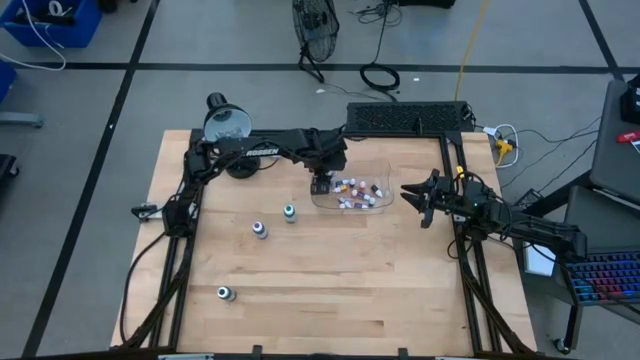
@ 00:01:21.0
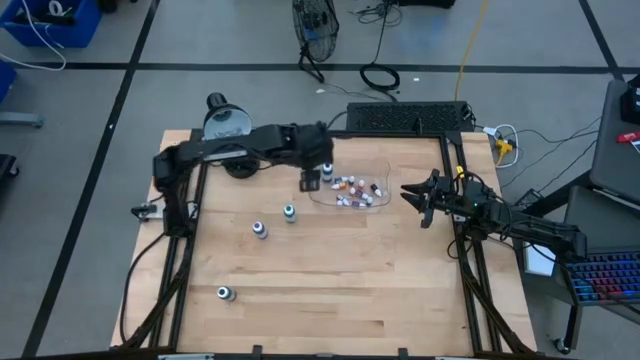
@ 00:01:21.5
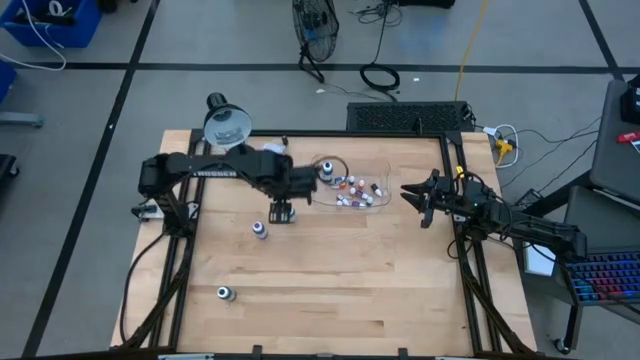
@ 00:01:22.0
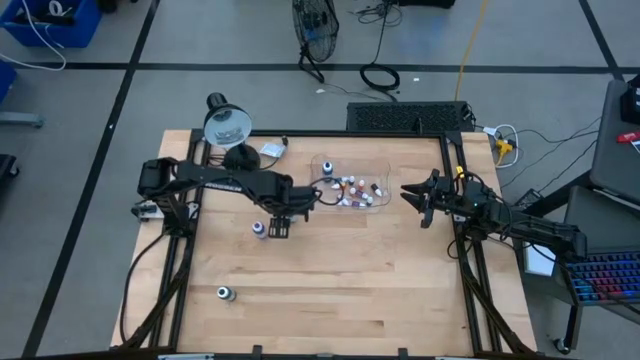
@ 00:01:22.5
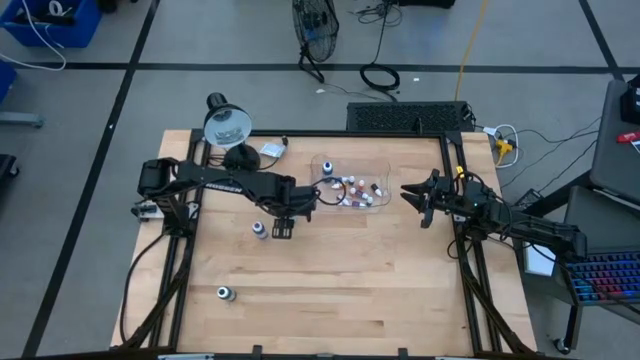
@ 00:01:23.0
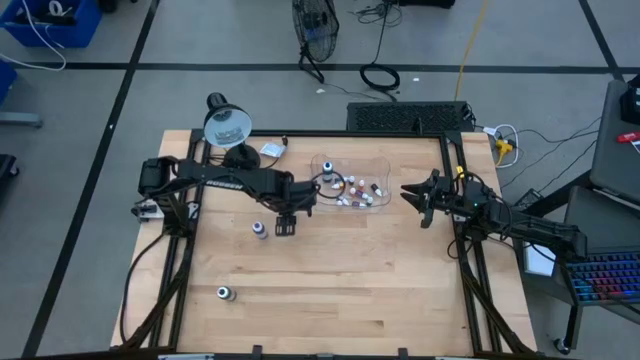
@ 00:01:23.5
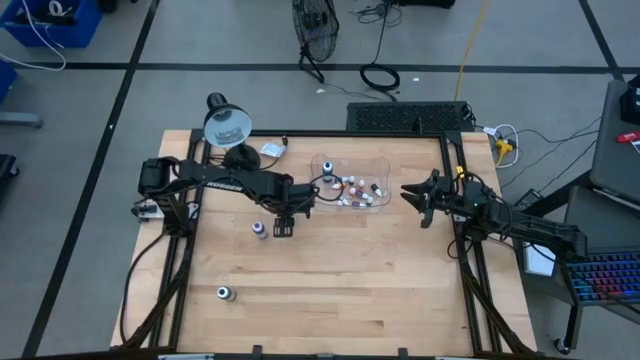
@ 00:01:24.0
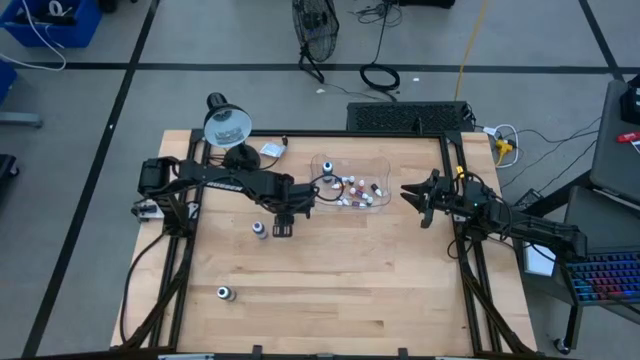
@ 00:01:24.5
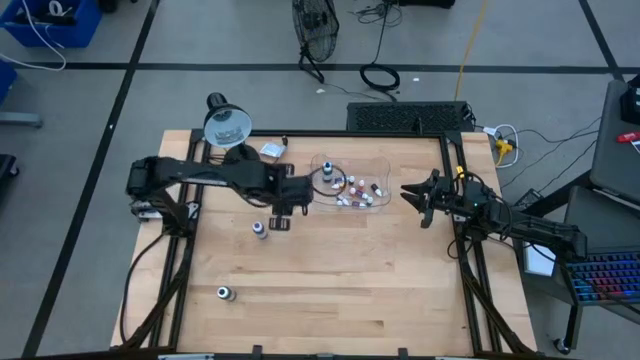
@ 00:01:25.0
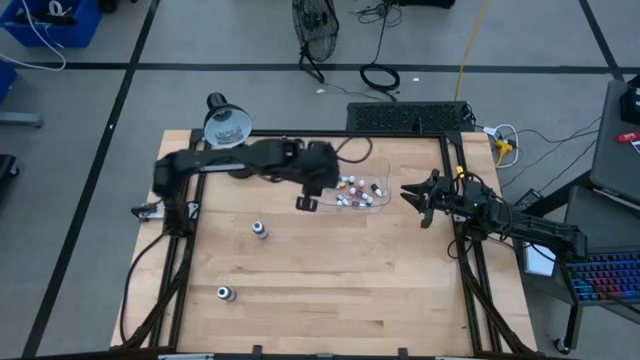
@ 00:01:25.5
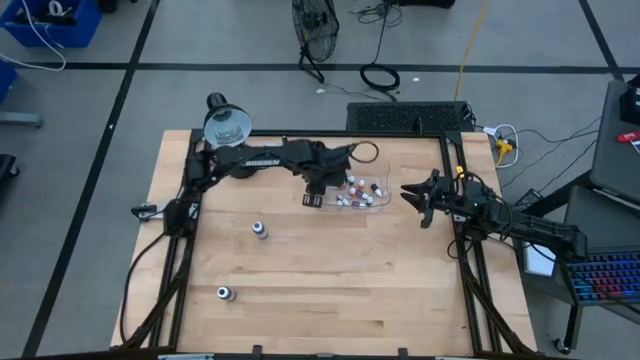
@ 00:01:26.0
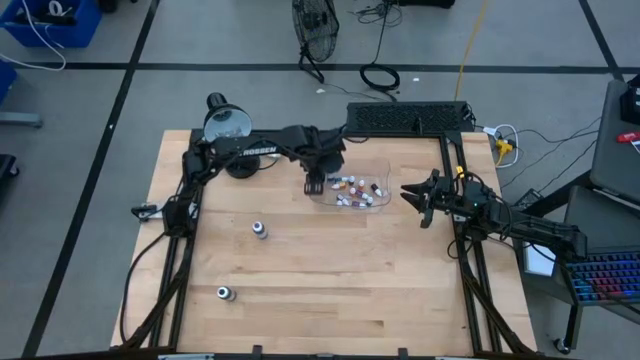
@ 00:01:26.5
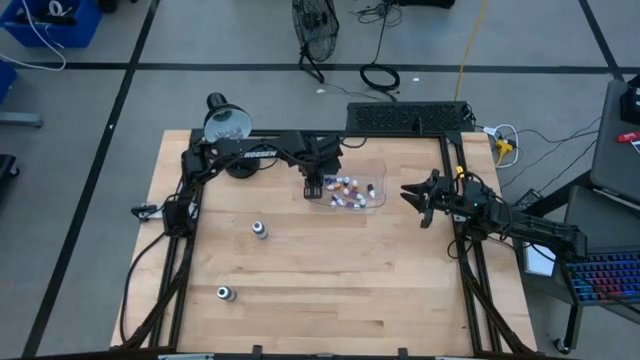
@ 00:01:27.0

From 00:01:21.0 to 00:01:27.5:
Task: Pick & Place food coloring
Put the green big food coloring into the transparent bin

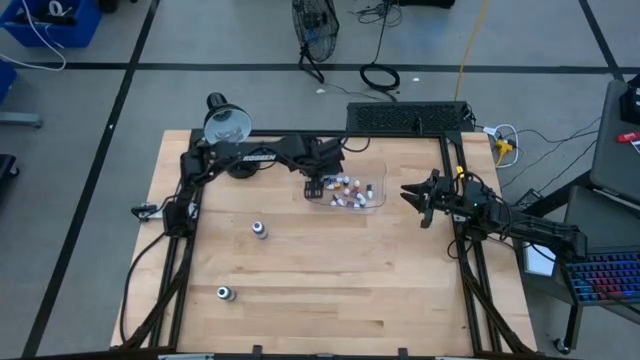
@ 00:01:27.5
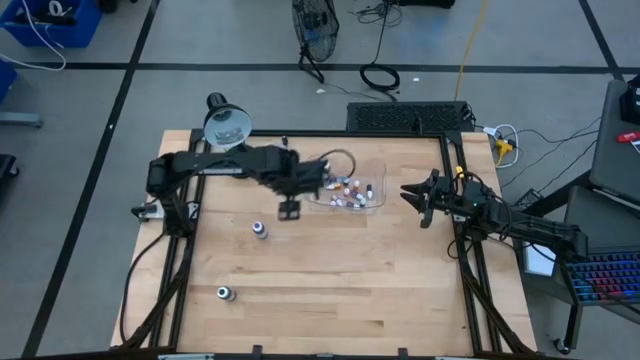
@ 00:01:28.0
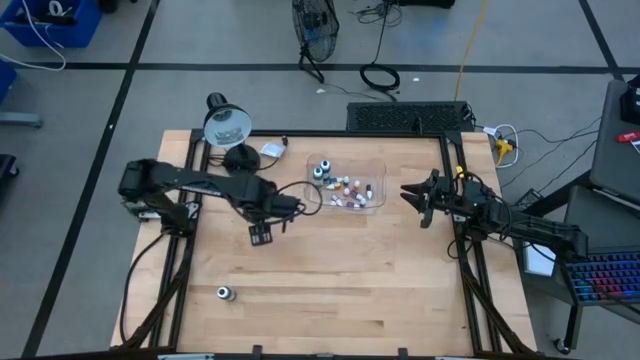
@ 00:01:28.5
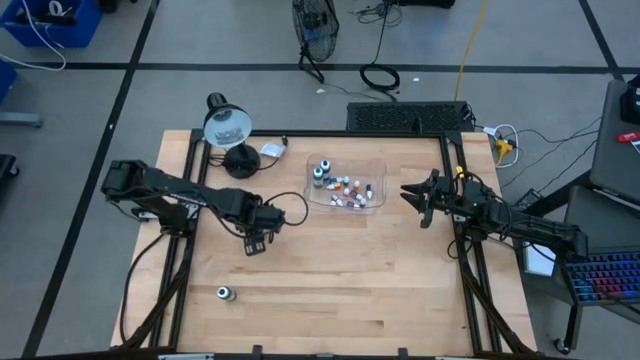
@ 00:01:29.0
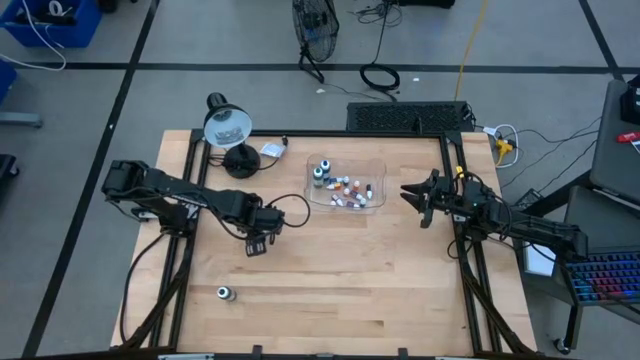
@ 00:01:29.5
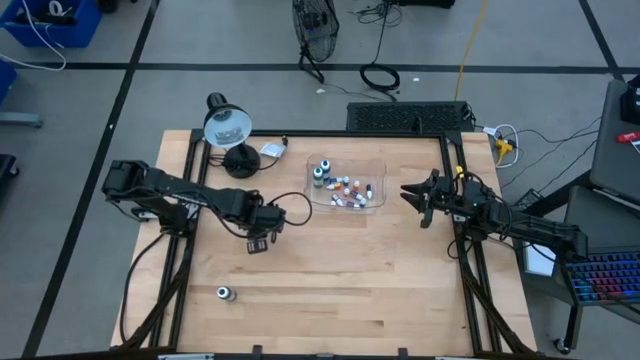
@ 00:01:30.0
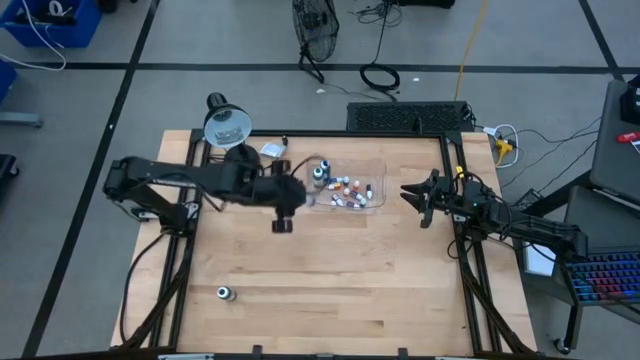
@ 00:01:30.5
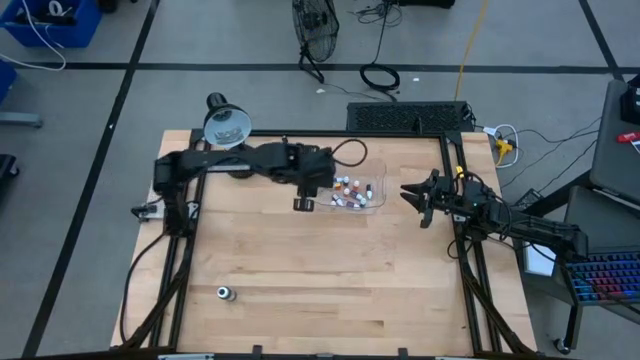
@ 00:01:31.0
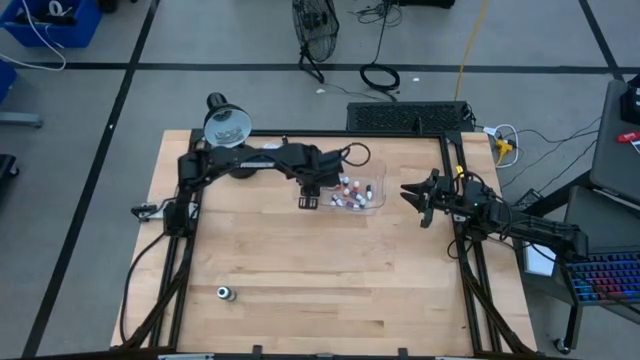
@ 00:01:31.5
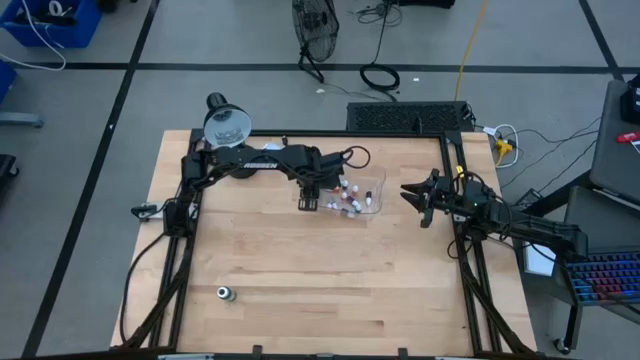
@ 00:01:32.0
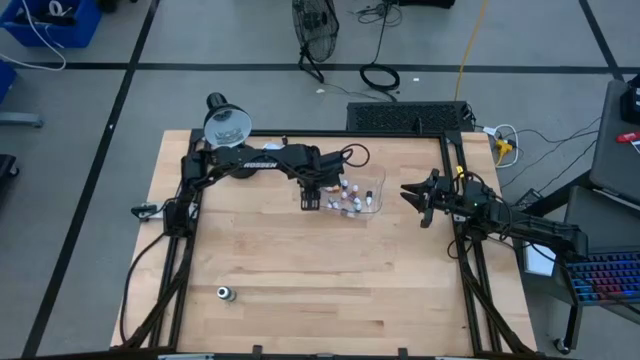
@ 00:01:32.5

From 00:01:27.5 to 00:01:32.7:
Put the purple big food coloring into the transparent bin

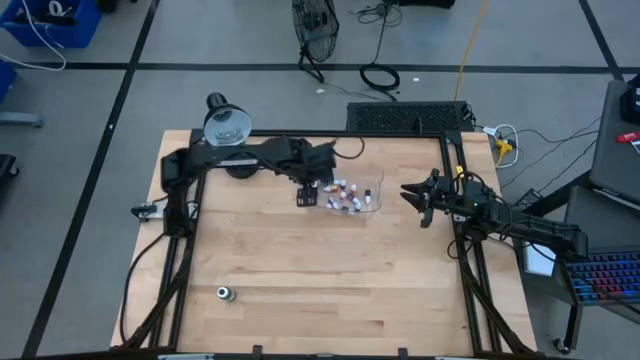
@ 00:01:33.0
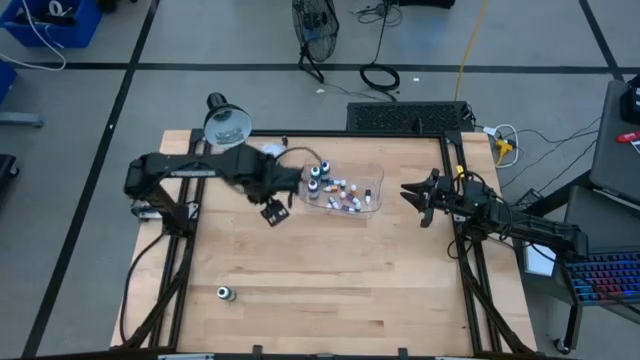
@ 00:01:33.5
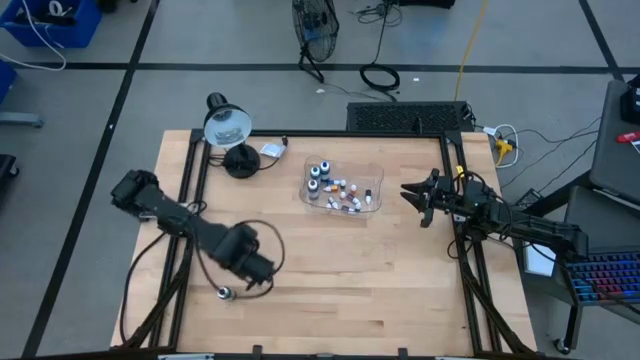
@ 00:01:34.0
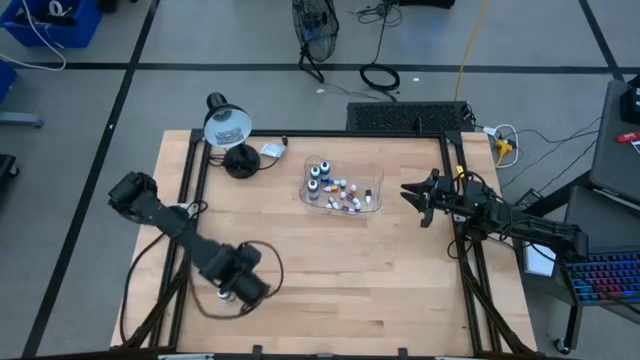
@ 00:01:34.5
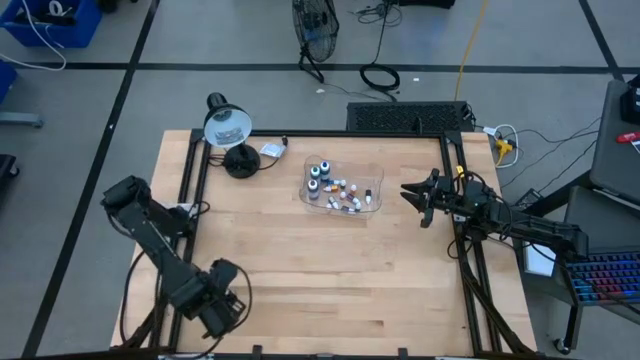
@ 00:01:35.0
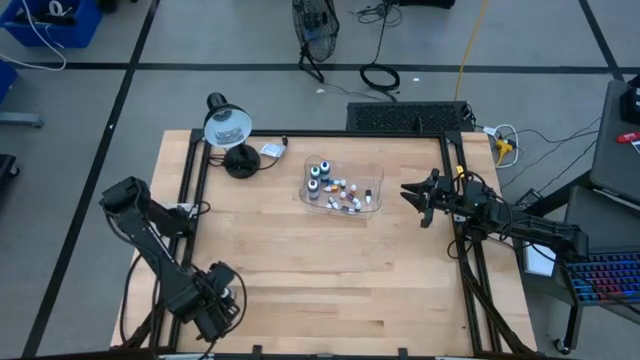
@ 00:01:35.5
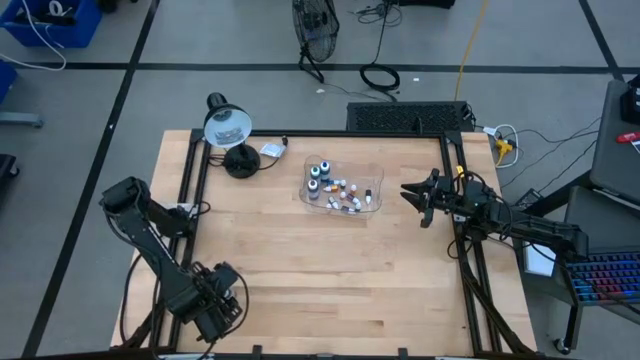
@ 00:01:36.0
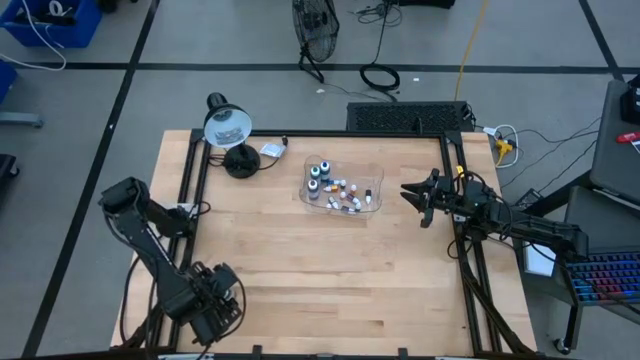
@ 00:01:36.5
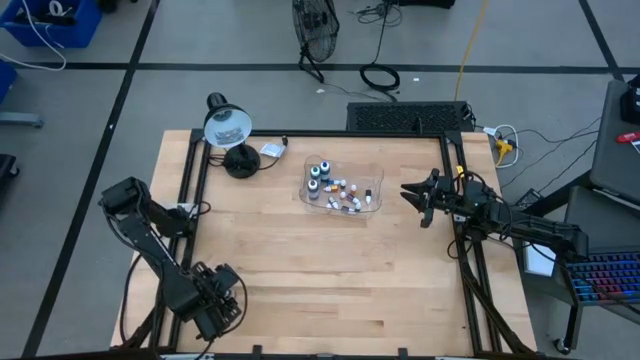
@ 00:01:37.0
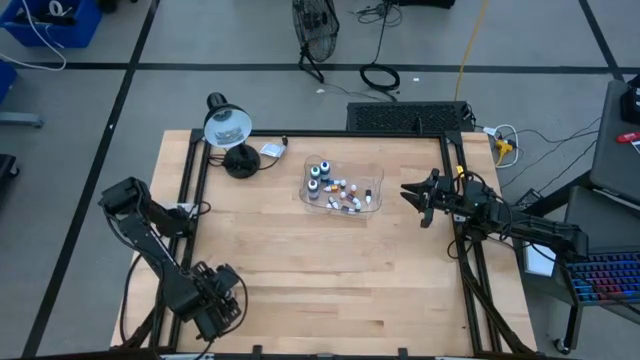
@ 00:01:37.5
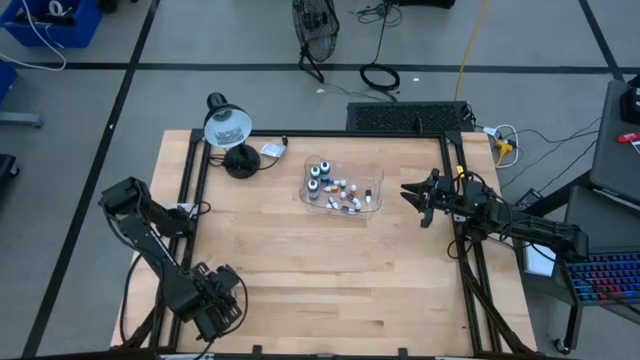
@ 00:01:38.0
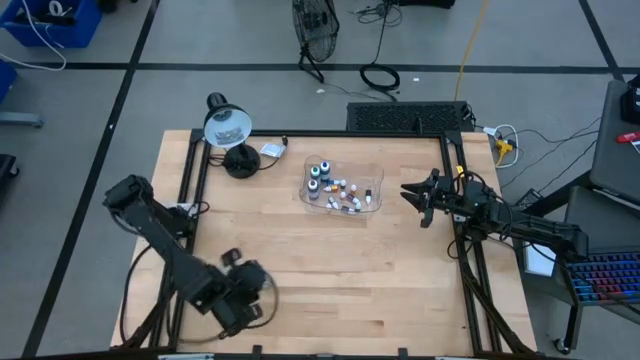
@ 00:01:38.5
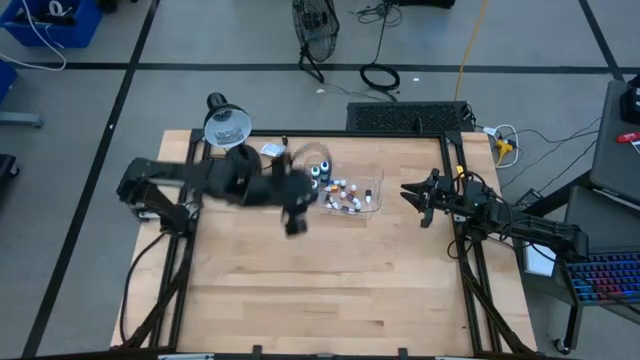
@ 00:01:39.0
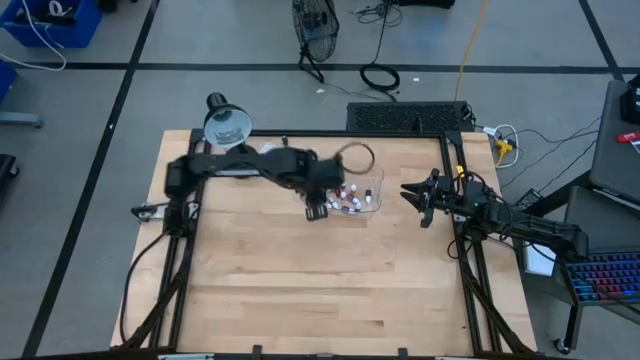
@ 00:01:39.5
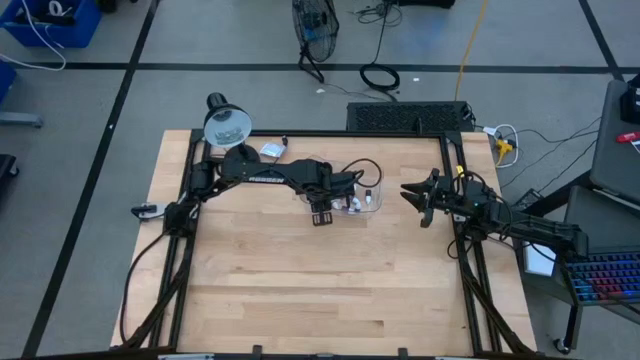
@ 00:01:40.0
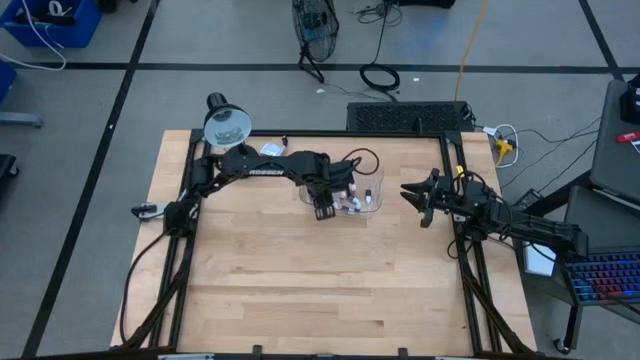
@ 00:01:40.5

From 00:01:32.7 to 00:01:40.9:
Put the black big food coloring into the transparent bin
